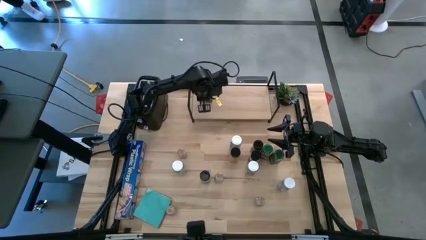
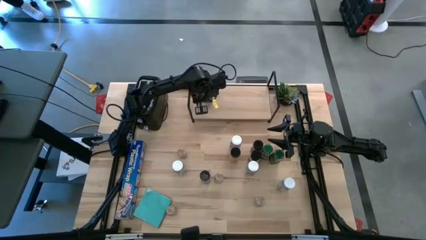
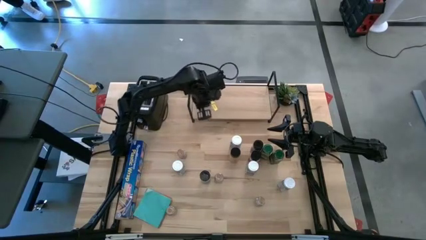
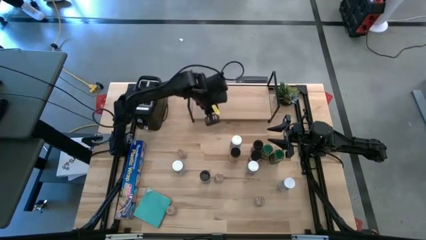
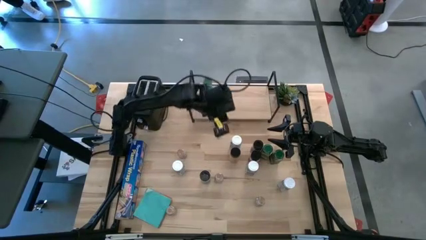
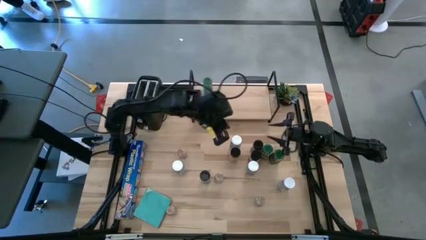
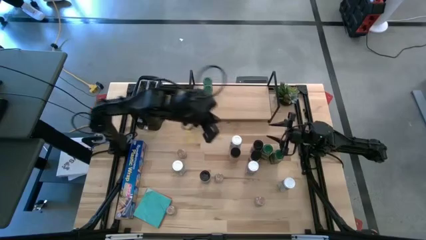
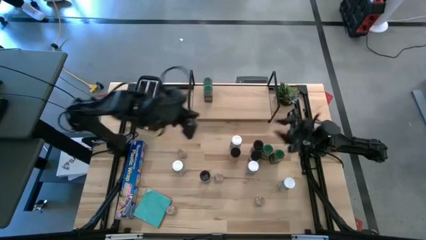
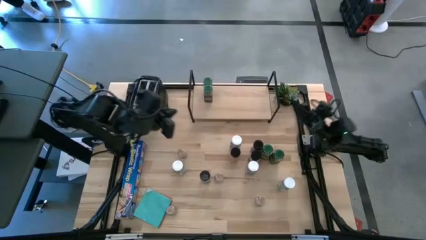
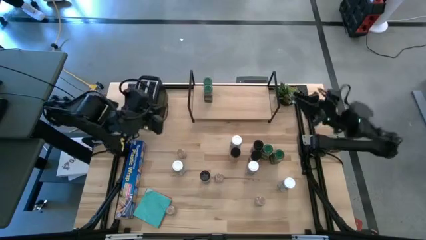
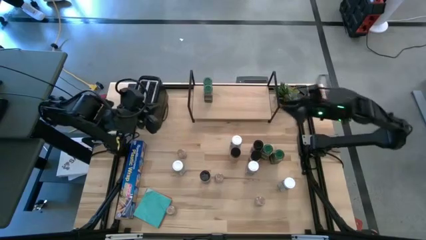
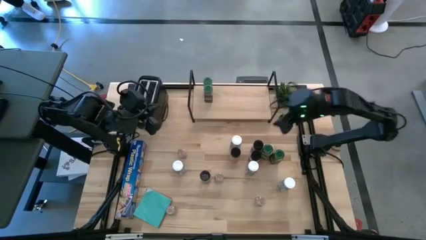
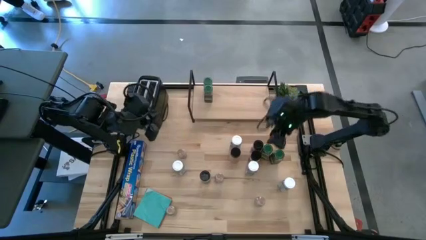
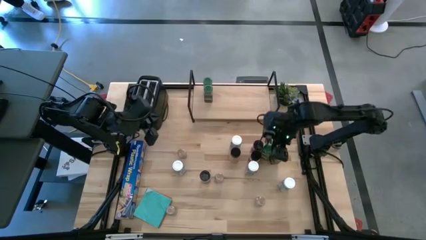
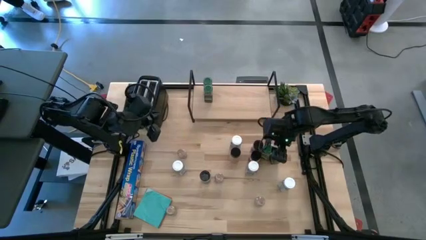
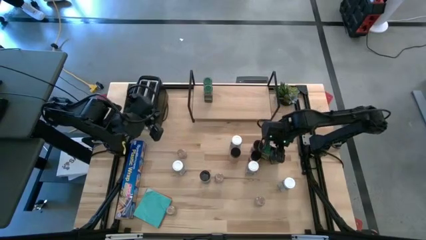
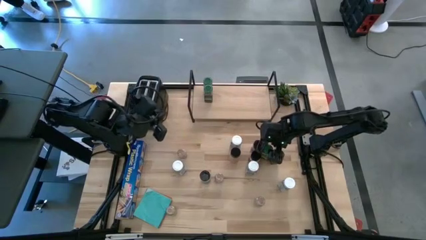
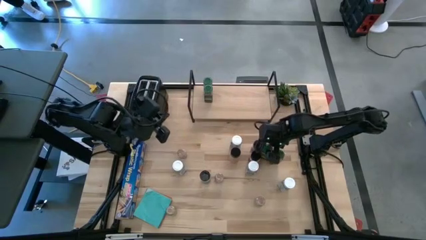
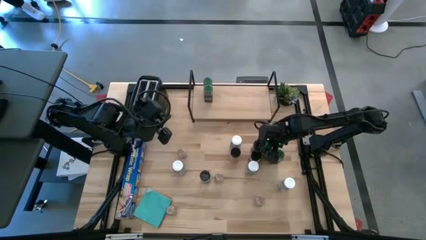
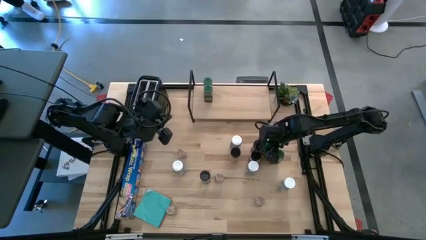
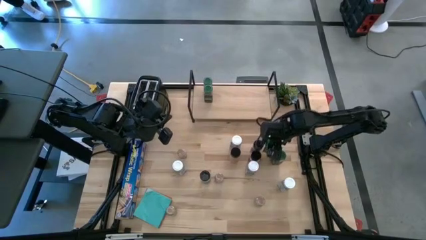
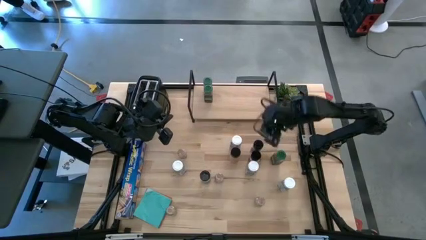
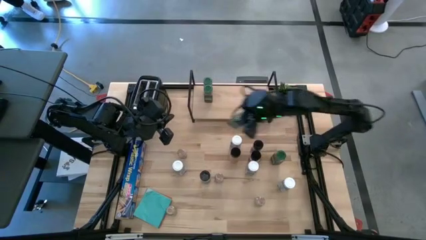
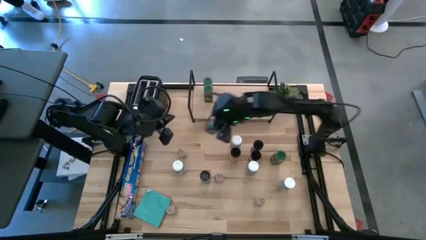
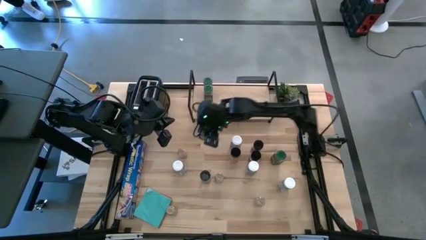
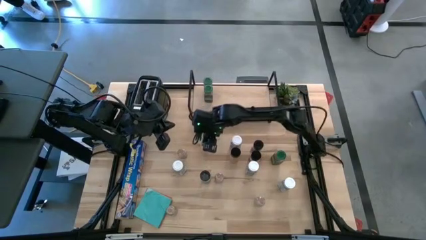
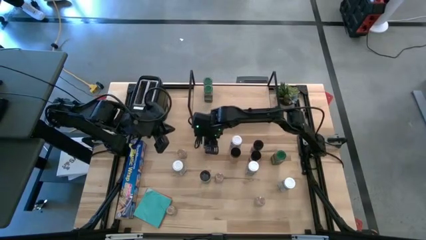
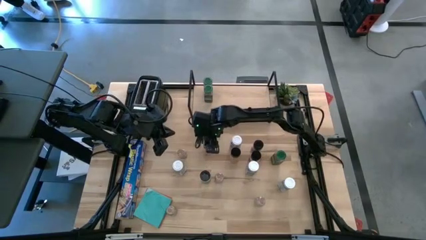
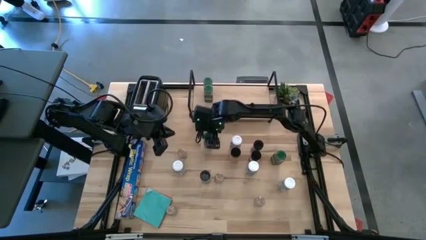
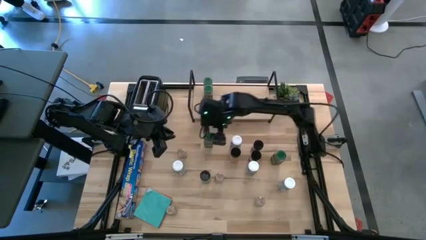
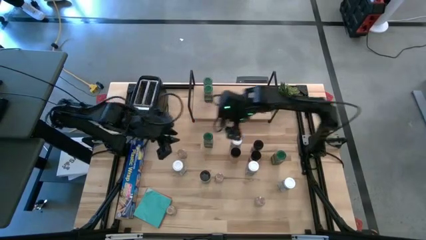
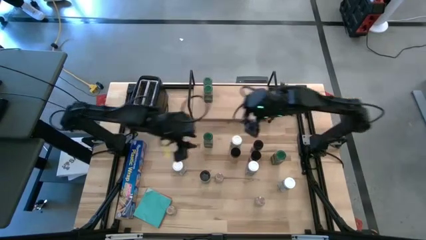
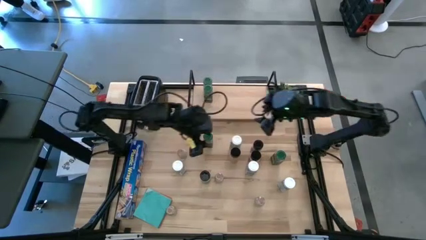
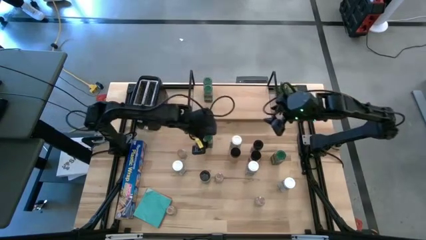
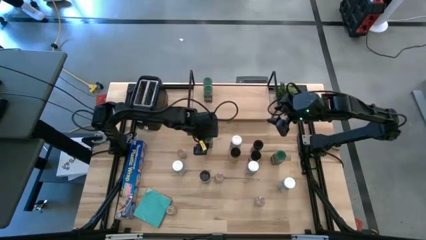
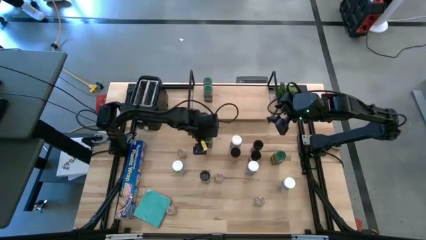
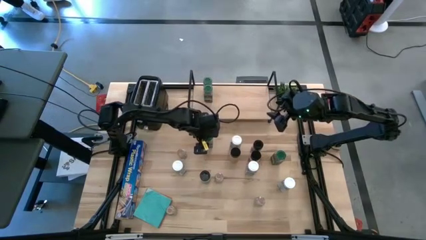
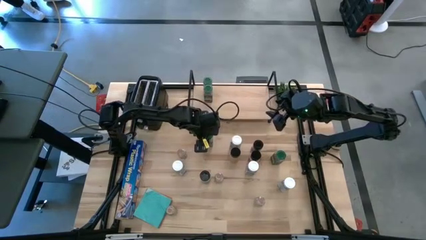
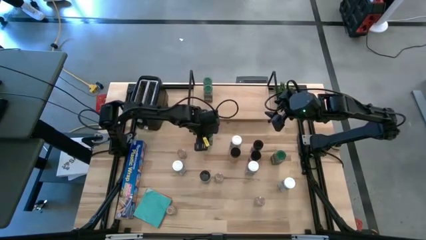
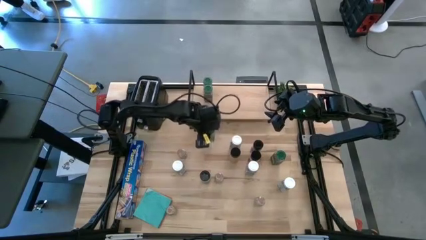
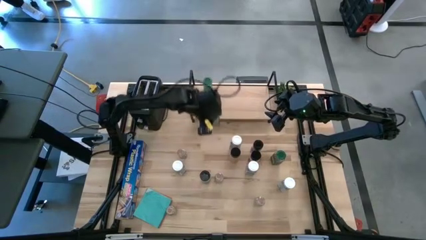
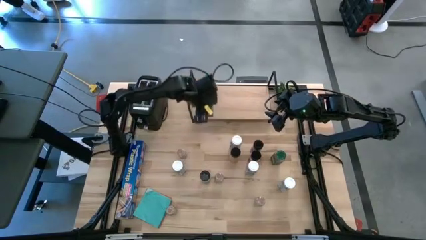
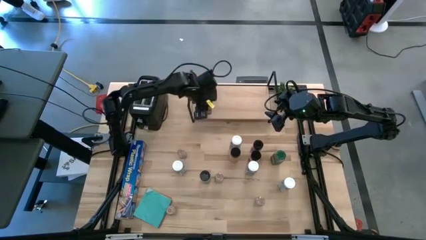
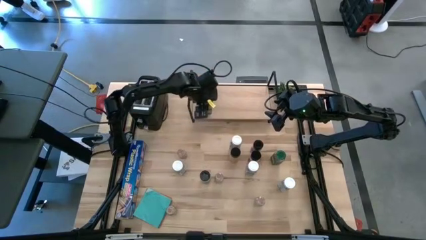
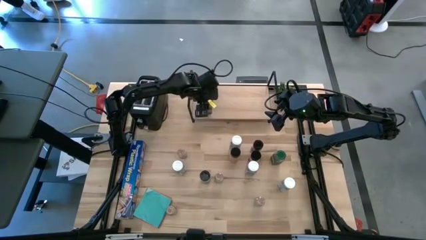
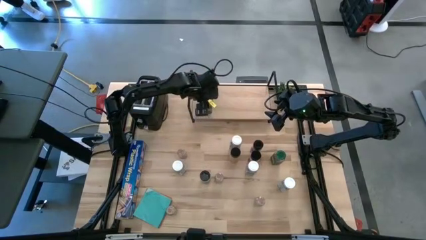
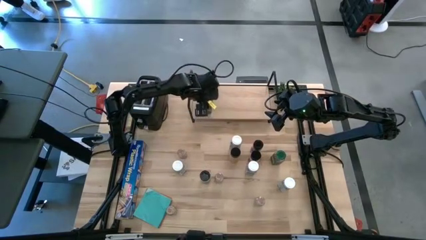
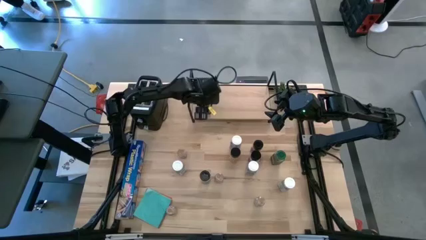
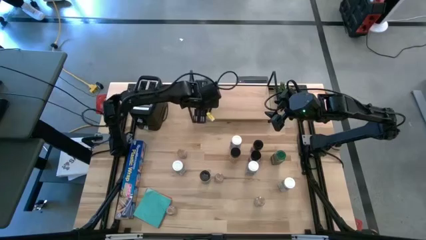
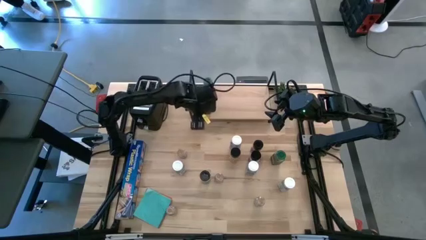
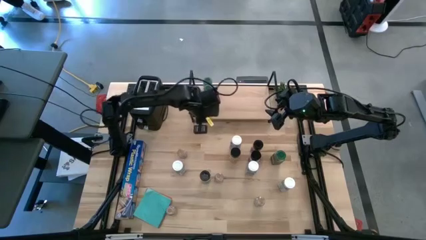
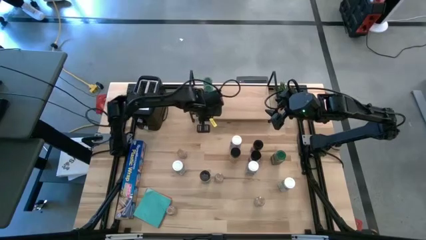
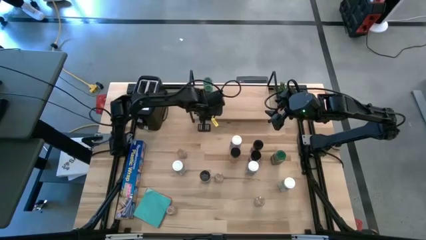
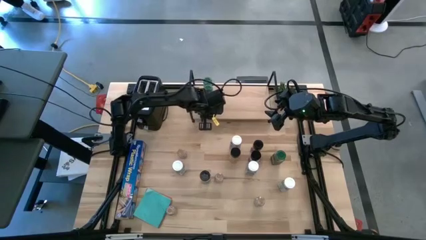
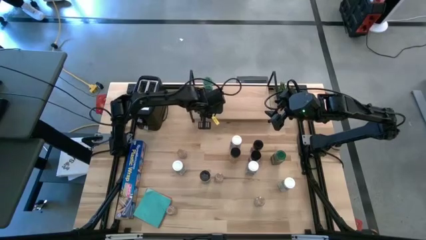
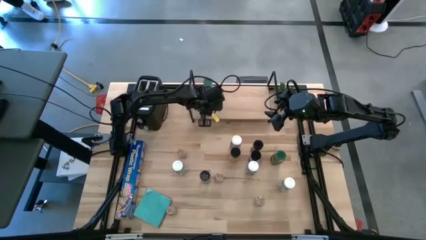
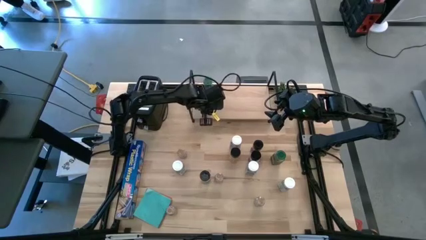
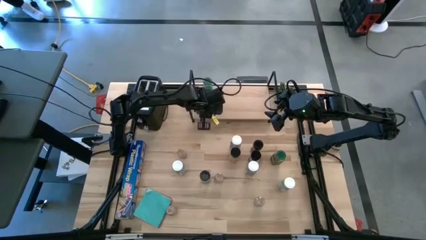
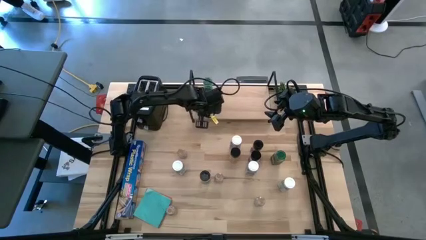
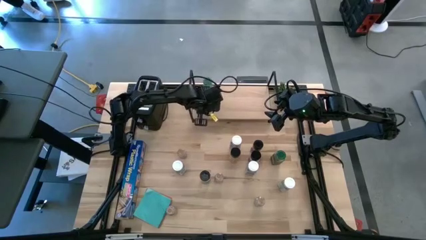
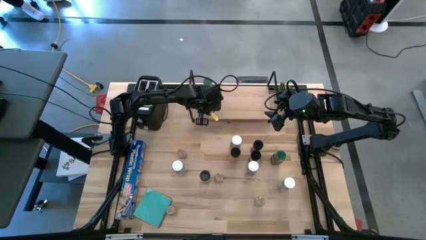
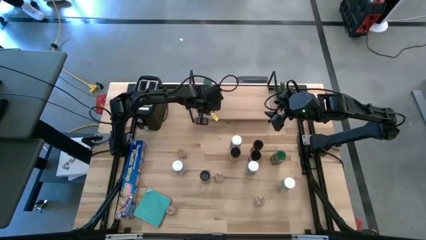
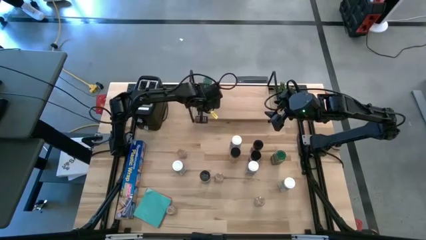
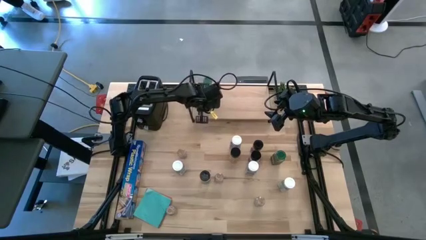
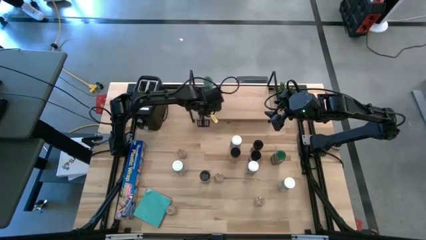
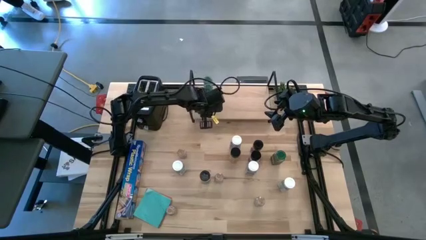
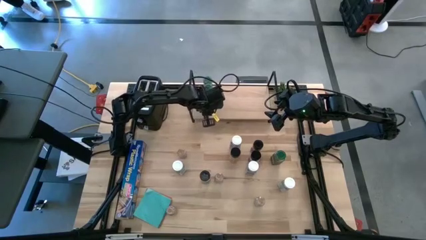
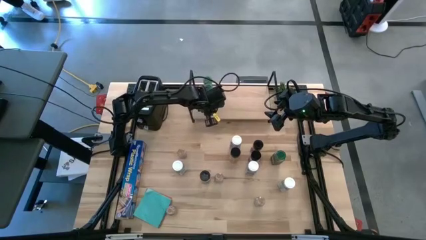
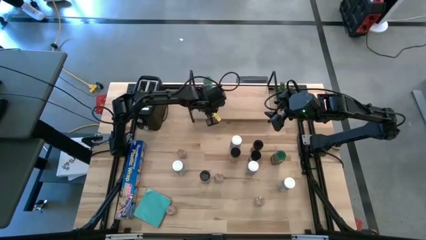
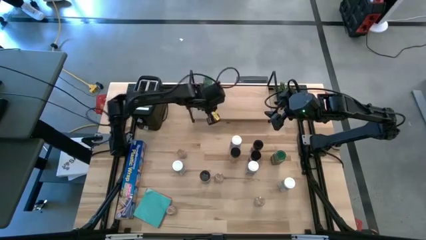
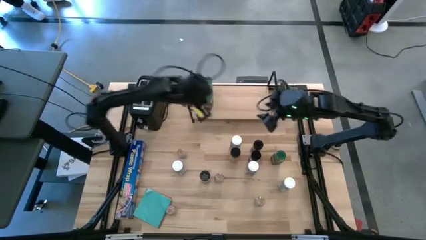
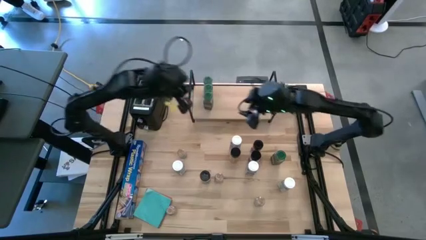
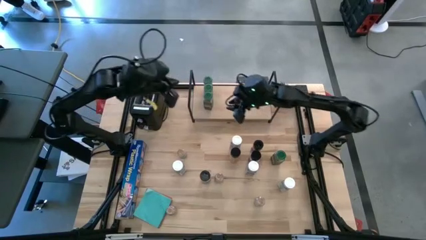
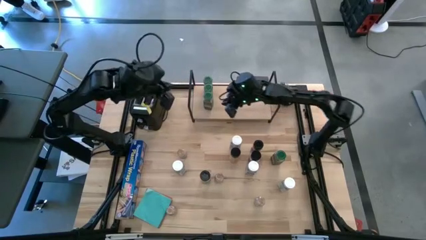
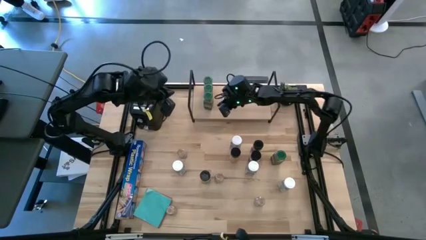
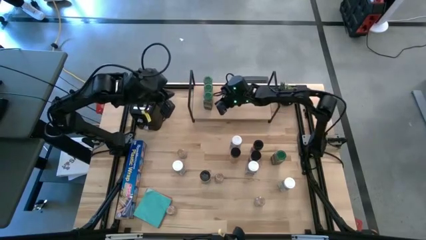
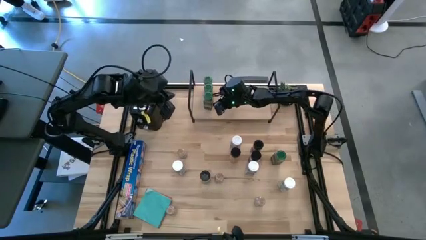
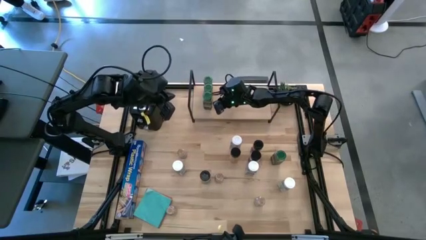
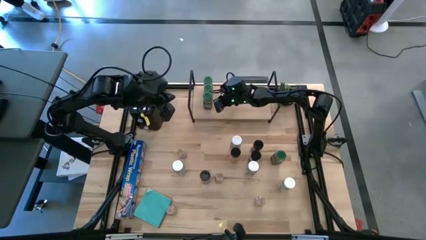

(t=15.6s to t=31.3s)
Task: Shelf spices
Put the left green seasoning bottle on the shelf aligned with the other green seasoning bottles
